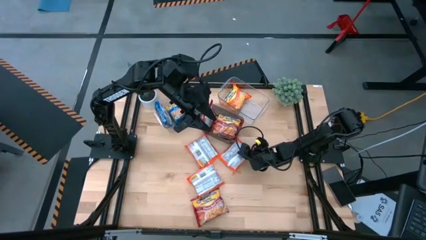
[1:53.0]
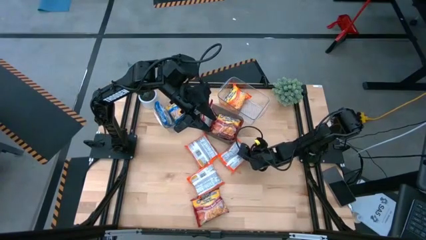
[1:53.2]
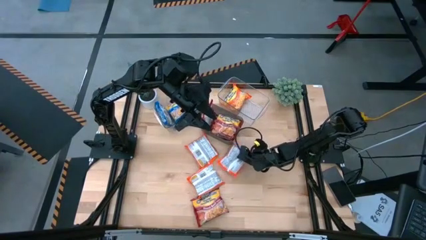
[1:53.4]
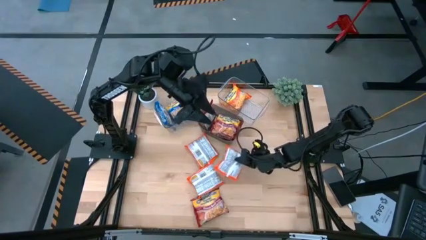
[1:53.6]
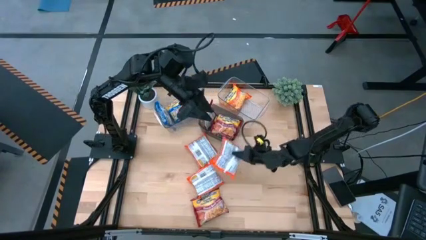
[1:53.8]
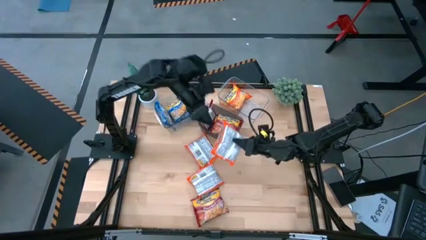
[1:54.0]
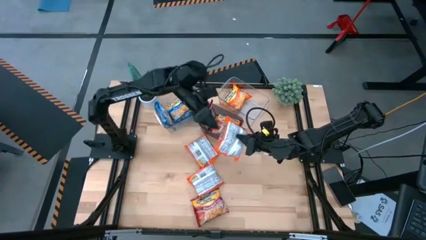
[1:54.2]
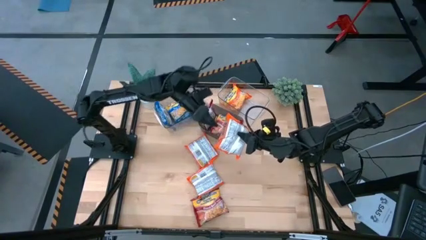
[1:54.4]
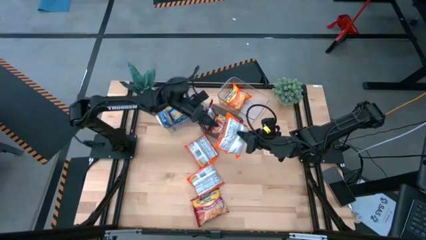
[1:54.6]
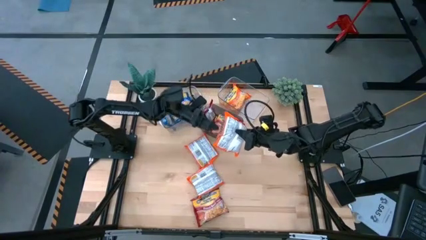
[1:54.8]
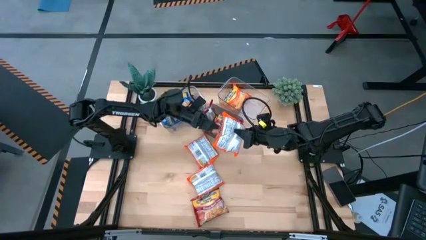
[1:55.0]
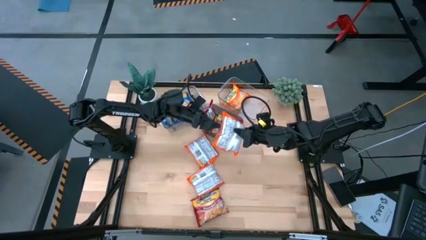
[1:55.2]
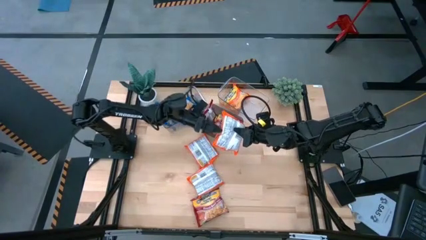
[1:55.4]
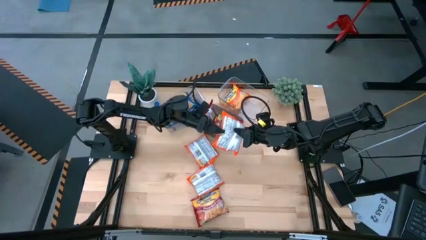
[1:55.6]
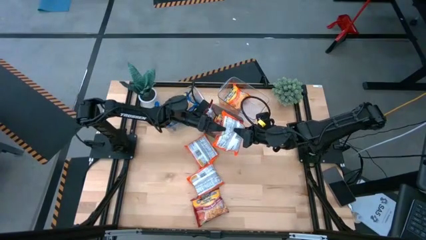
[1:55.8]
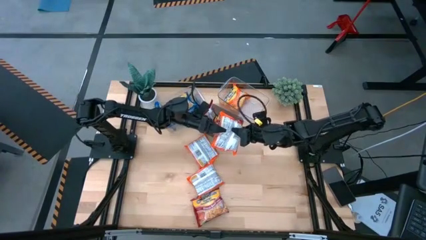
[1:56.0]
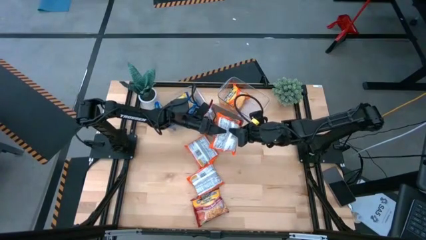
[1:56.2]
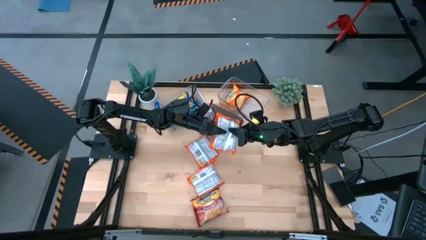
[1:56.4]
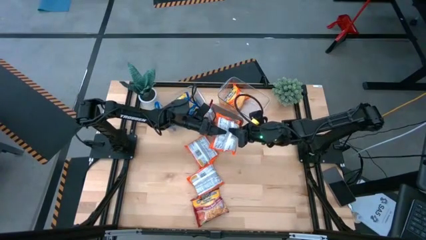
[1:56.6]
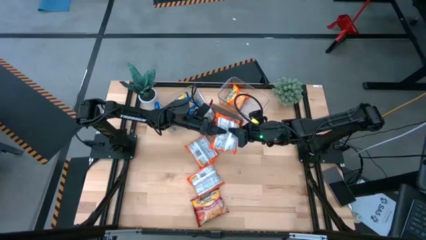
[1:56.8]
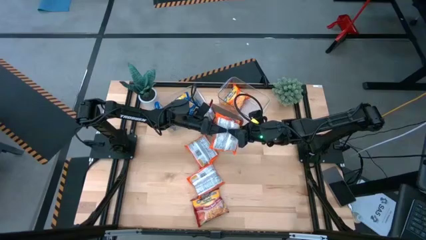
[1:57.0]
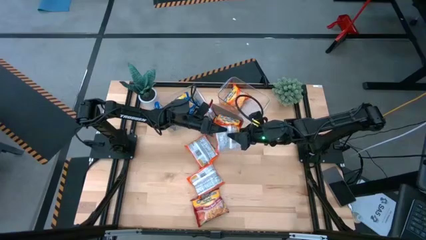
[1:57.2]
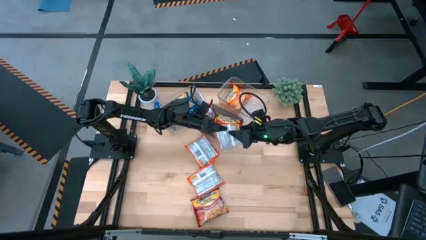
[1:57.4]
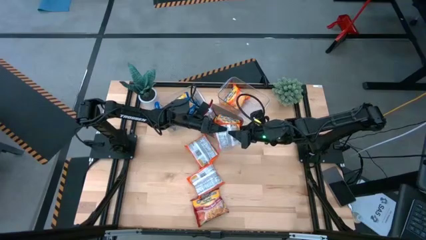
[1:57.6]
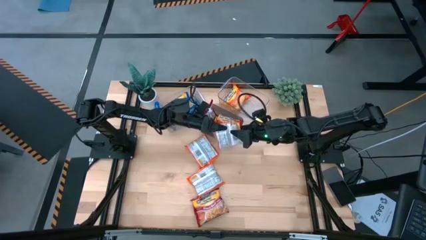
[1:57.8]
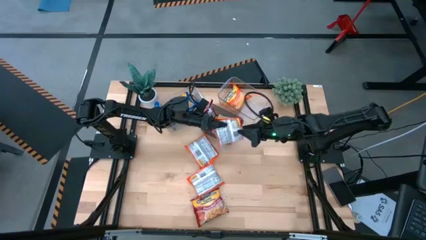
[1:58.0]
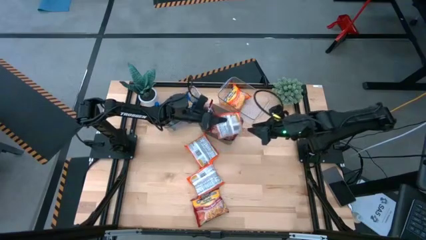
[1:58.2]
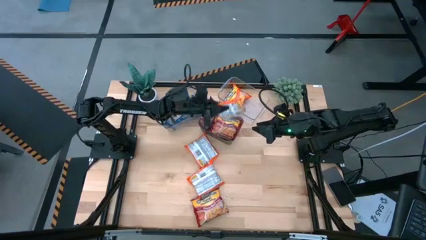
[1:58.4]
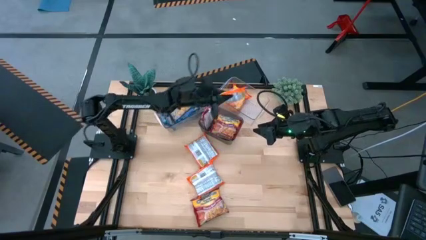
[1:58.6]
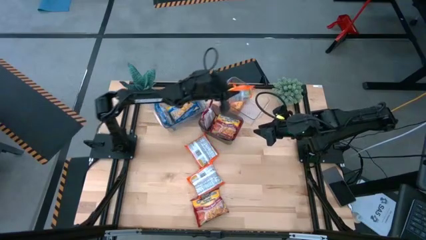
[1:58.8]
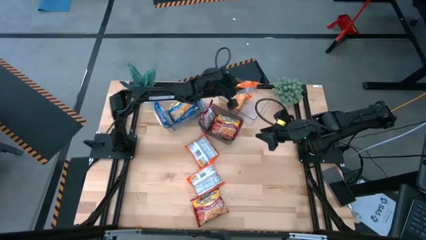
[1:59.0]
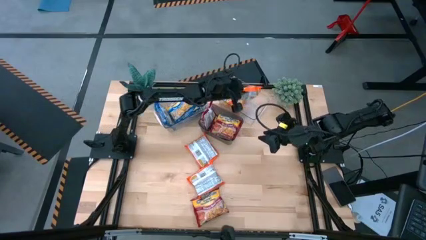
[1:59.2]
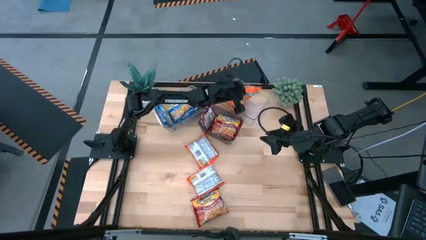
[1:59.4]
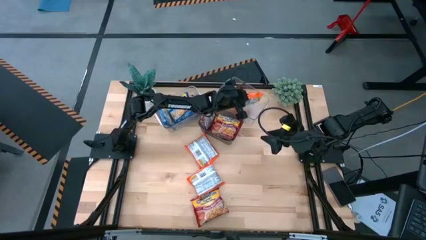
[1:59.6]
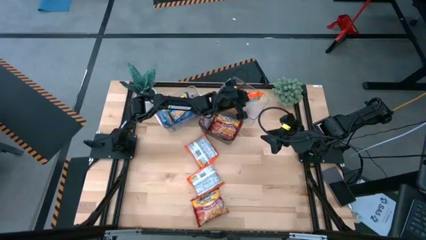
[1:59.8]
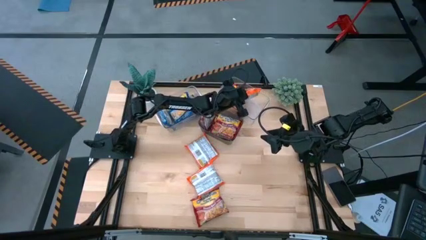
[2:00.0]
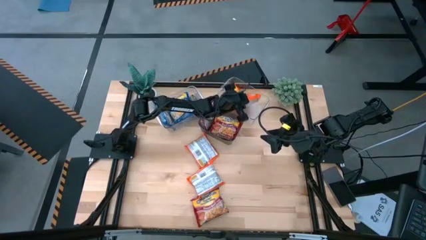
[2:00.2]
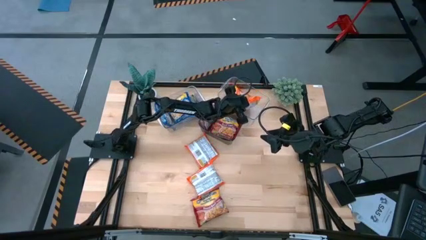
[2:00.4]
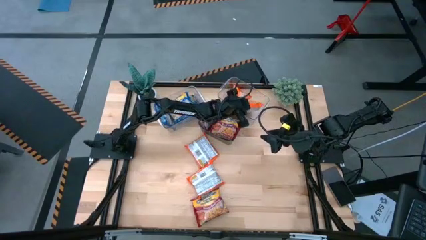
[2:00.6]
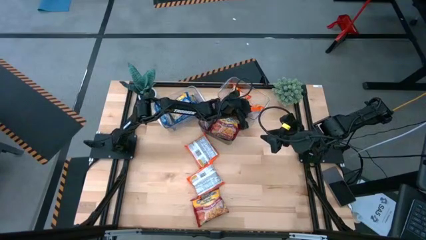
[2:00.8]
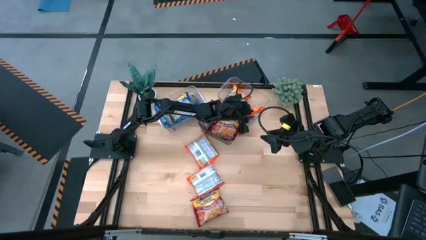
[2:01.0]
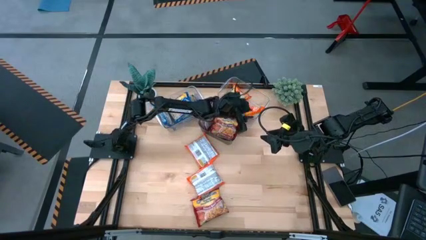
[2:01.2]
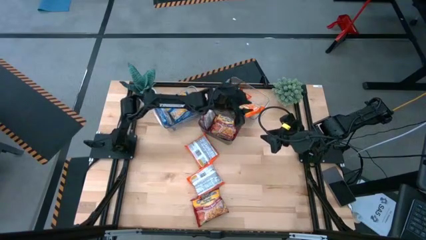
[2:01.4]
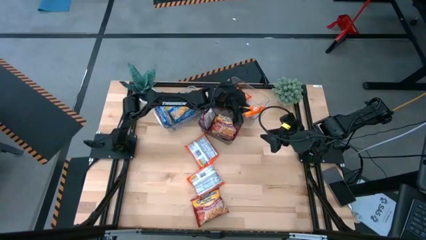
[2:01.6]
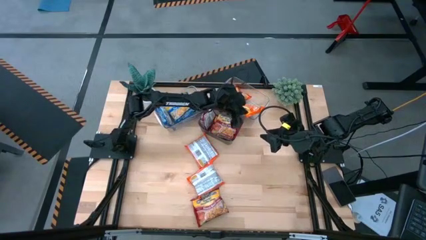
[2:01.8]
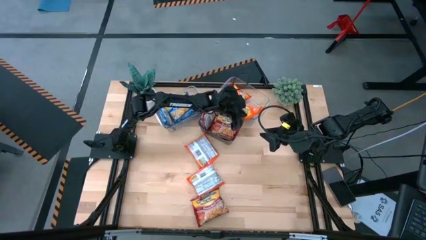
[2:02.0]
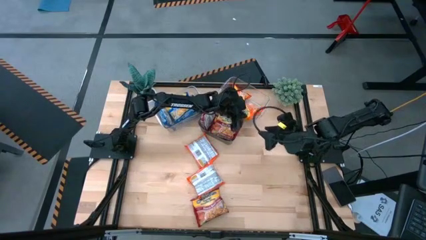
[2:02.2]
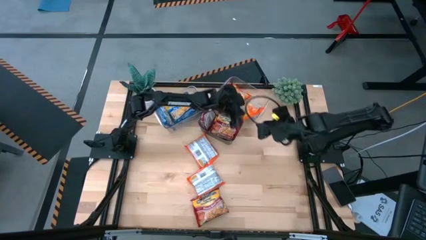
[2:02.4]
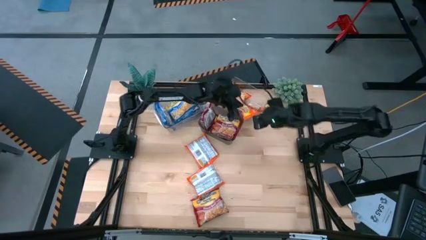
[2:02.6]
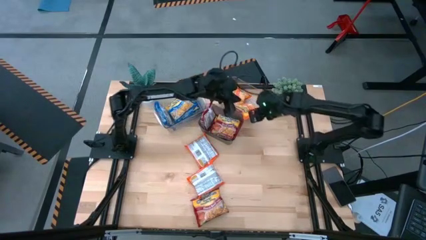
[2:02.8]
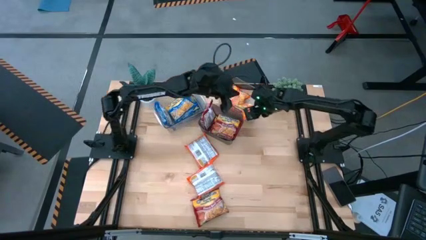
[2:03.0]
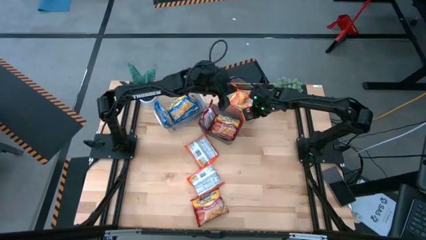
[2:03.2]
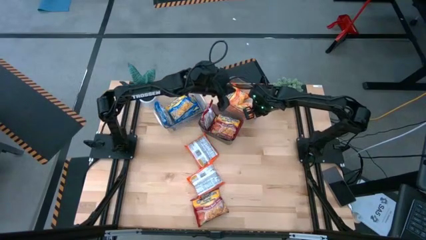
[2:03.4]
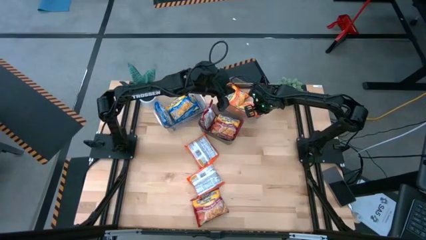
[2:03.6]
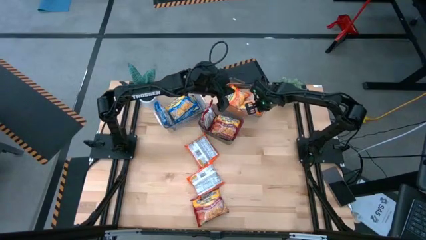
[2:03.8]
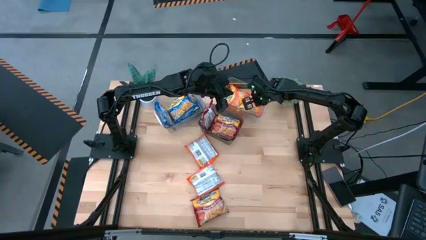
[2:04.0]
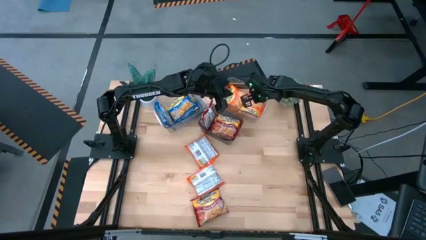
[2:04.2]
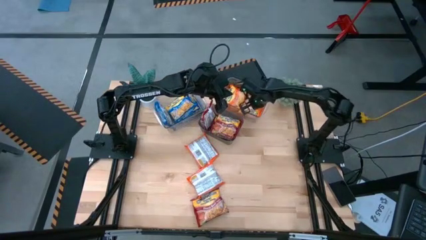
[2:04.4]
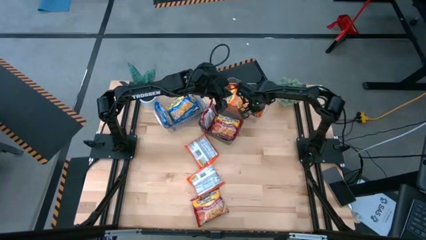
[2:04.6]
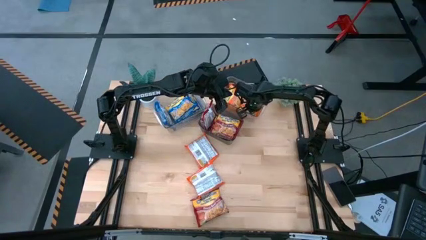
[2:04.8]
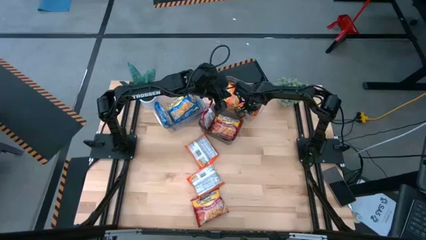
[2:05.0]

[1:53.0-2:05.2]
Task: Sort Maruchan noodles
Put the orange noodle pack into the right transparent bin

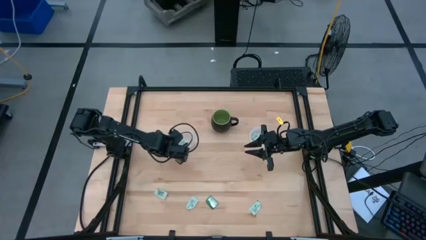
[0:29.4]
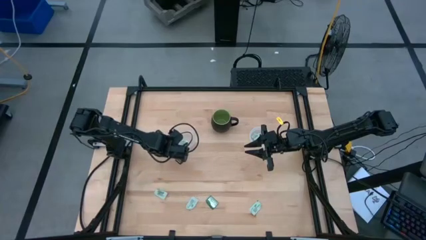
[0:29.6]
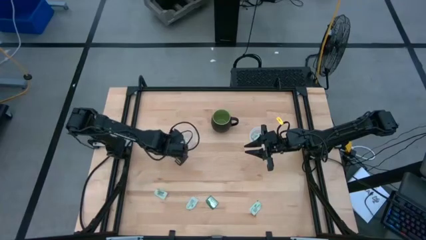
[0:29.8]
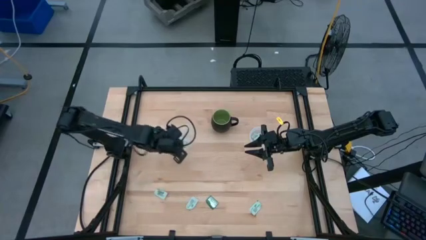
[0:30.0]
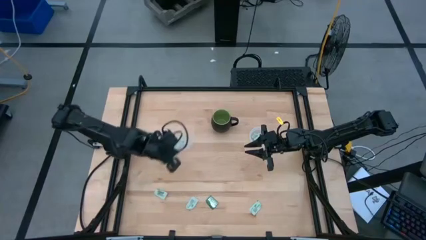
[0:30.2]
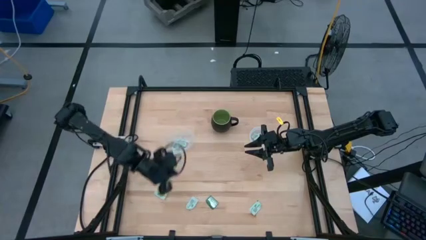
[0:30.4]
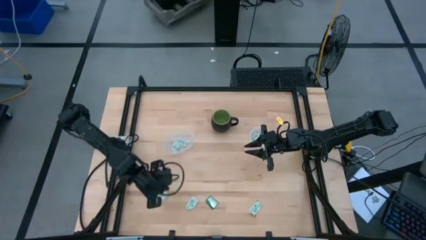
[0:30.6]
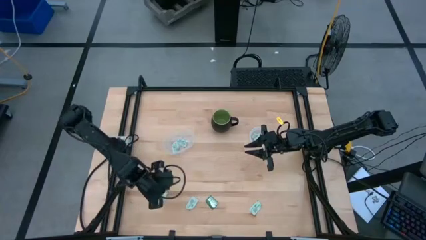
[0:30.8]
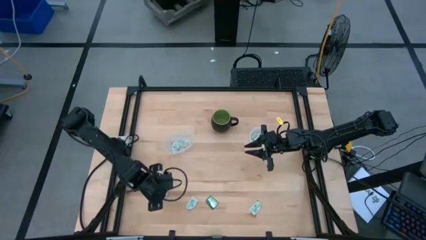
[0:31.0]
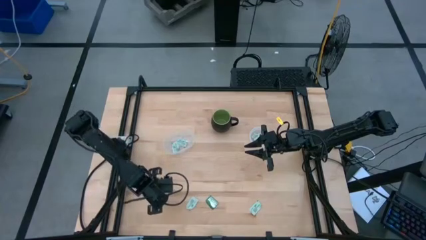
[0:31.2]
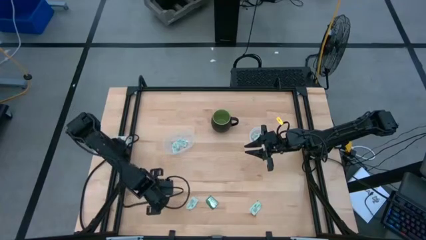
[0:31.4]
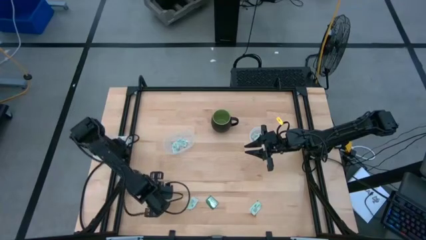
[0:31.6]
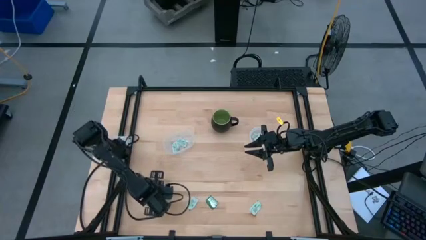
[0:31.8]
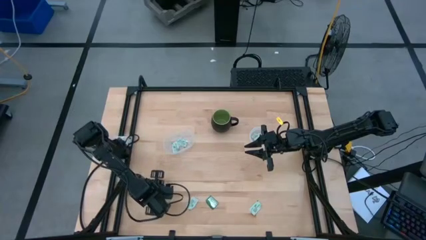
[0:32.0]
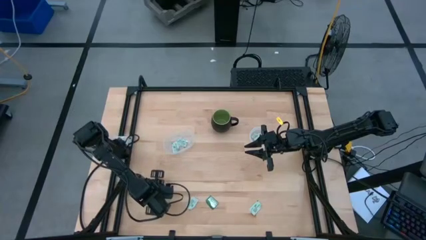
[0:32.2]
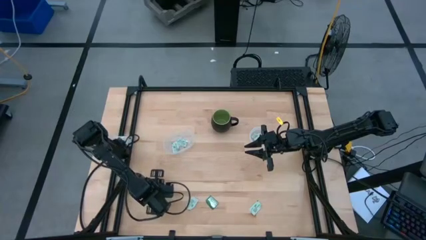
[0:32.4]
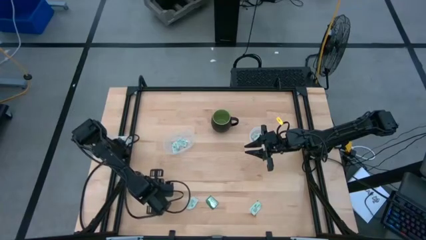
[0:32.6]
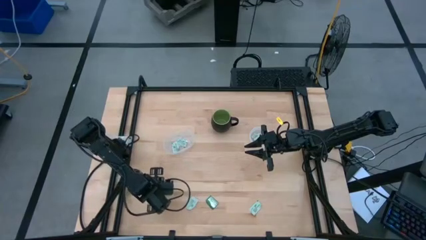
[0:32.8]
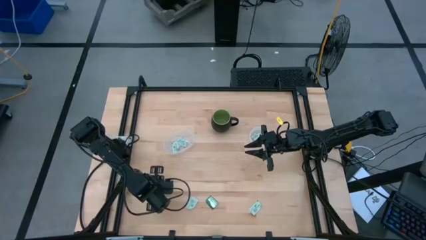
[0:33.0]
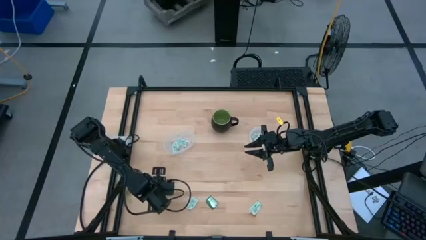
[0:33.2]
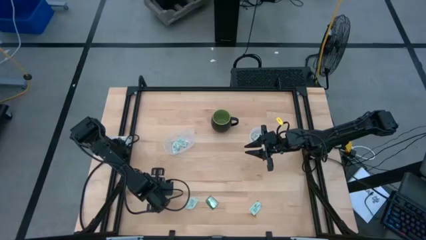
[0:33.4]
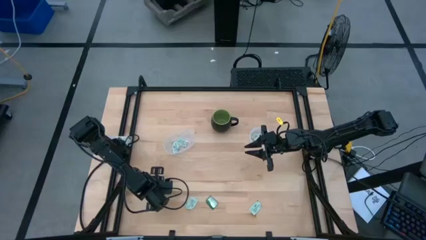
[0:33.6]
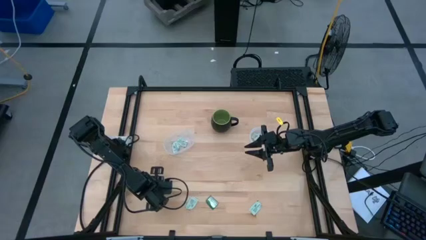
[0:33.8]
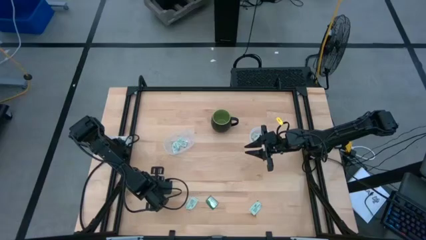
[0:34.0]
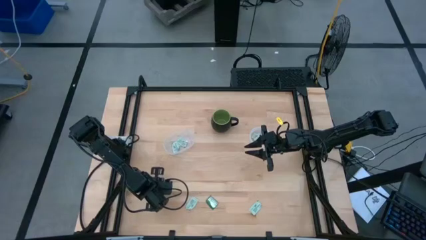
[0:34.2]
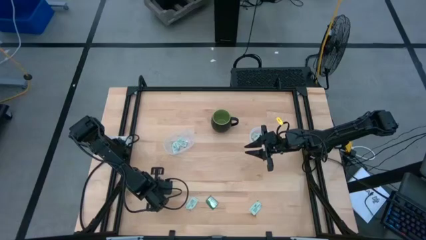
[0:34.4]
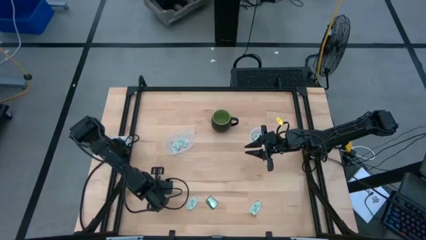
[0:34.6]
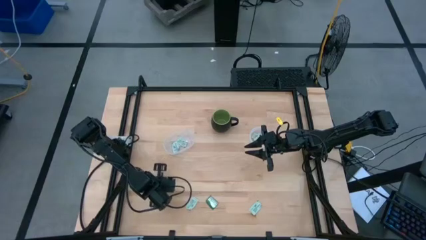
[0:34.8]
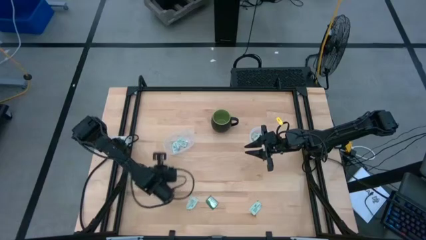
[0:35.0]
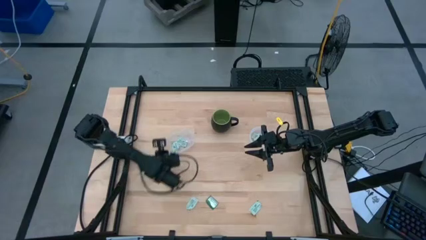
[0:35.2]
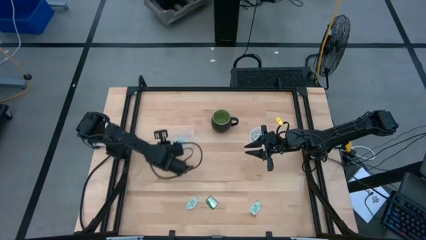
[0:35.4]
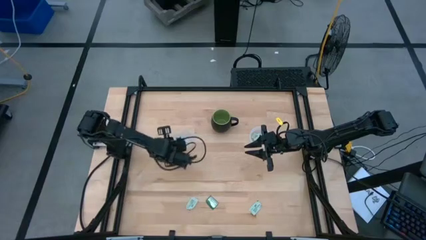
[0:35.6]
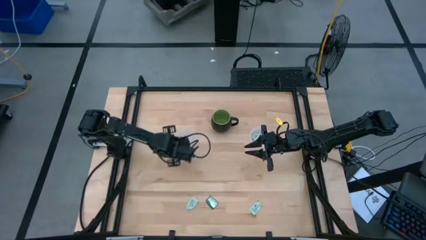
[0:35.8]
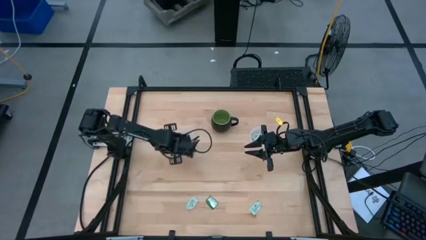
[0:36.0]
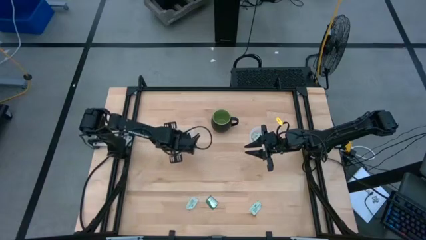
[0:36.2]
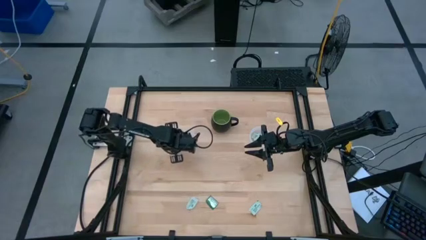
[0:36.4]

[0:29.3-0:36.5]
Task: Pick and place Stevia / Truvia into bins
Put the green stevia packet into the left transparent container
